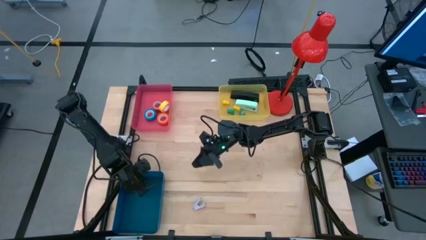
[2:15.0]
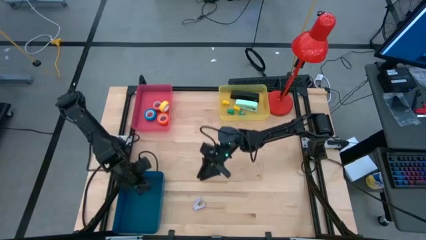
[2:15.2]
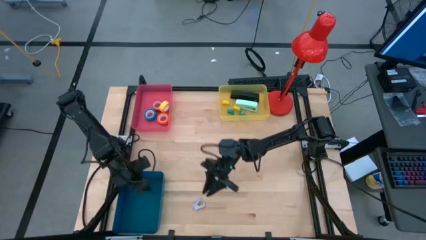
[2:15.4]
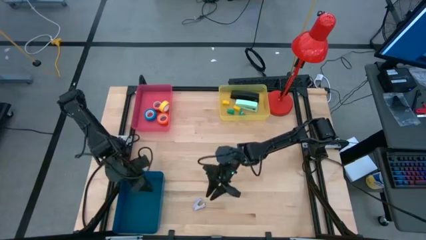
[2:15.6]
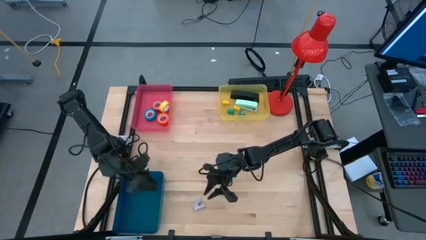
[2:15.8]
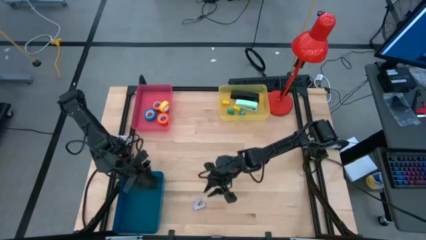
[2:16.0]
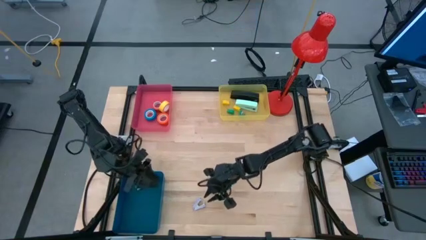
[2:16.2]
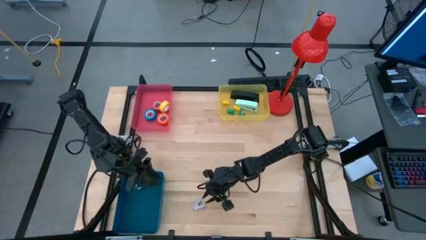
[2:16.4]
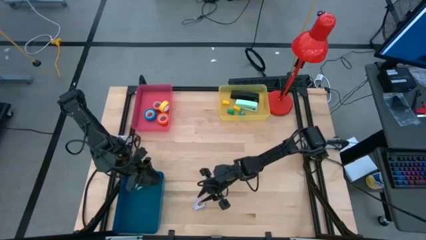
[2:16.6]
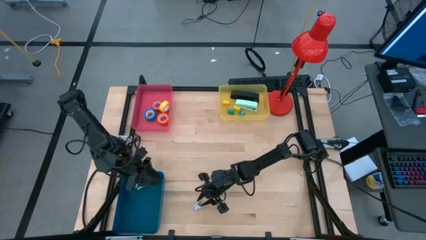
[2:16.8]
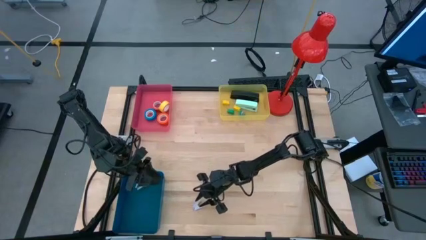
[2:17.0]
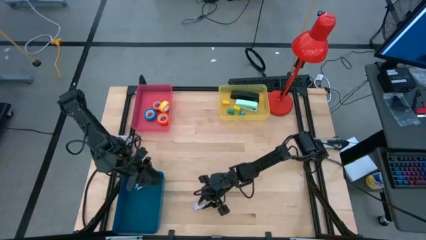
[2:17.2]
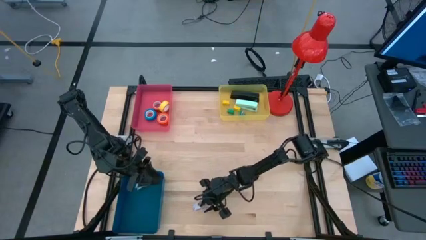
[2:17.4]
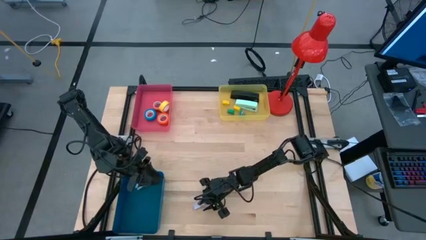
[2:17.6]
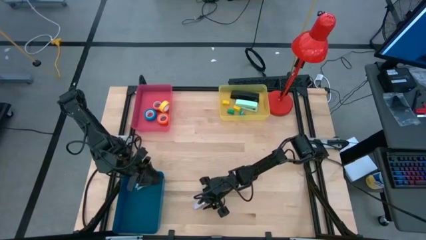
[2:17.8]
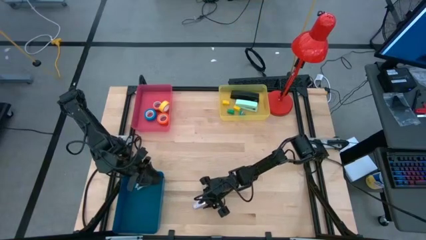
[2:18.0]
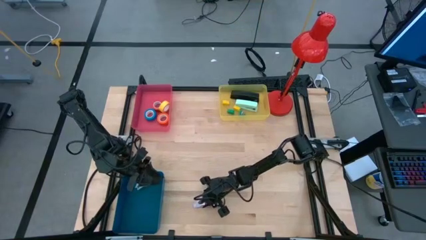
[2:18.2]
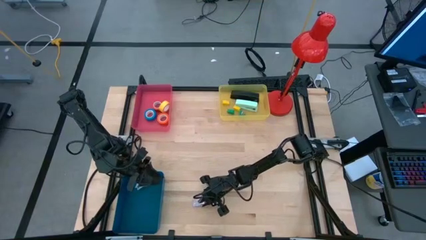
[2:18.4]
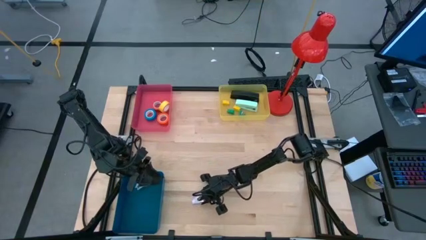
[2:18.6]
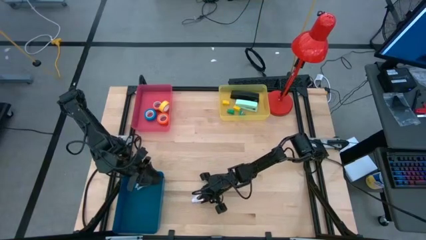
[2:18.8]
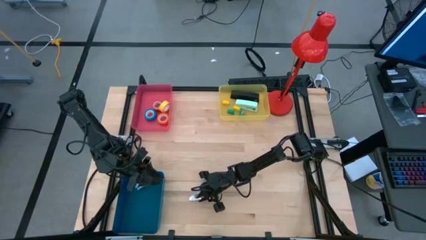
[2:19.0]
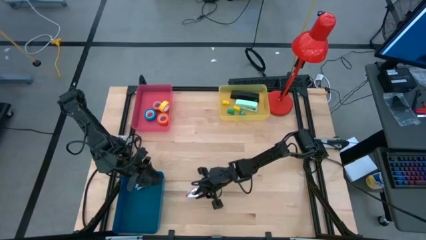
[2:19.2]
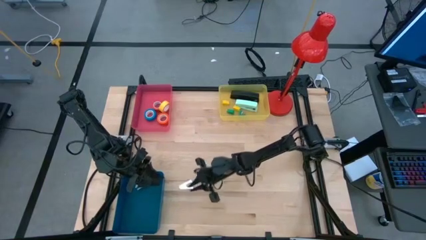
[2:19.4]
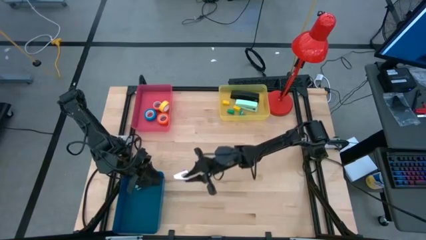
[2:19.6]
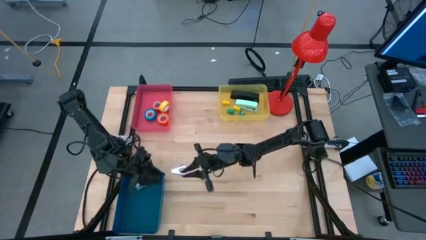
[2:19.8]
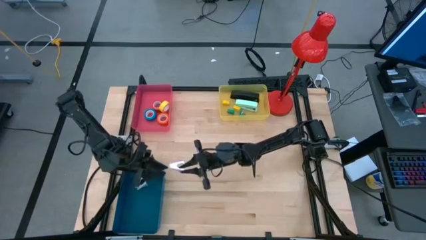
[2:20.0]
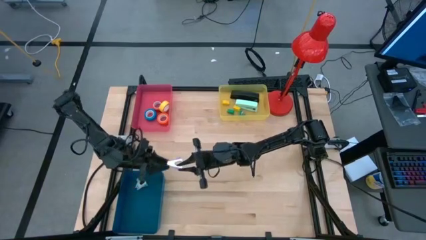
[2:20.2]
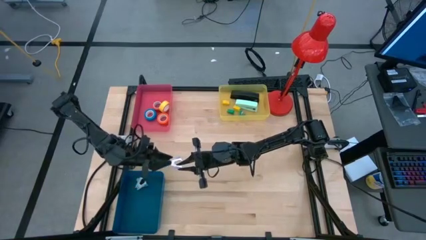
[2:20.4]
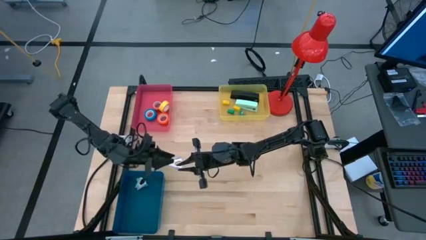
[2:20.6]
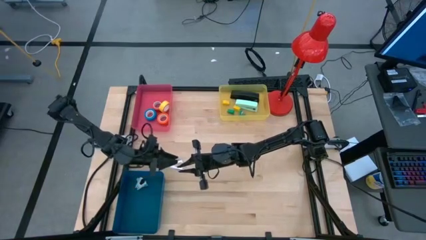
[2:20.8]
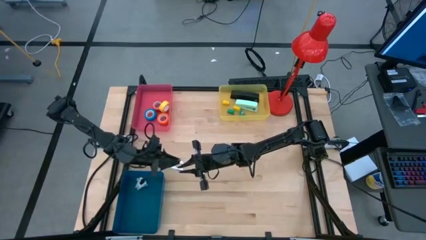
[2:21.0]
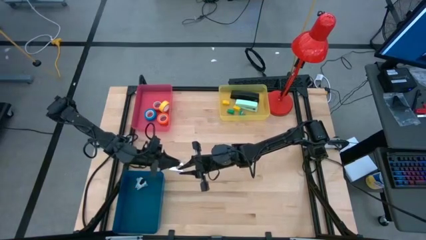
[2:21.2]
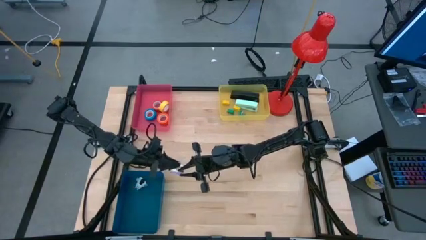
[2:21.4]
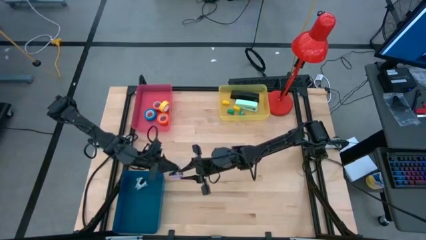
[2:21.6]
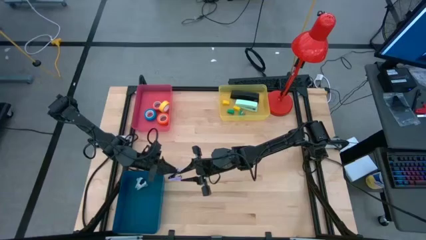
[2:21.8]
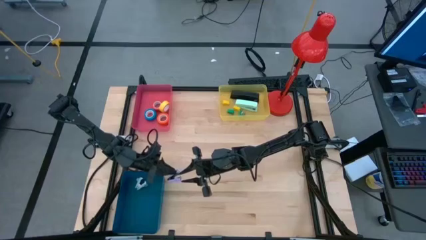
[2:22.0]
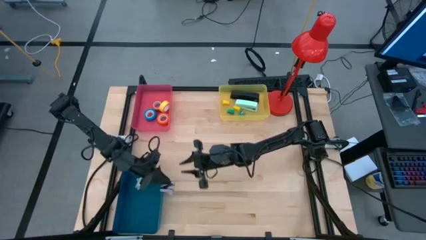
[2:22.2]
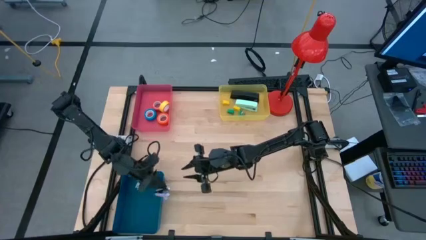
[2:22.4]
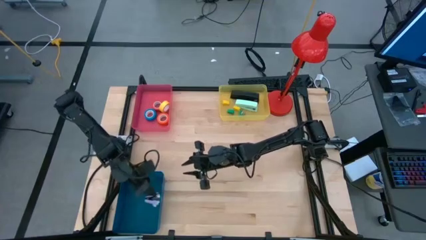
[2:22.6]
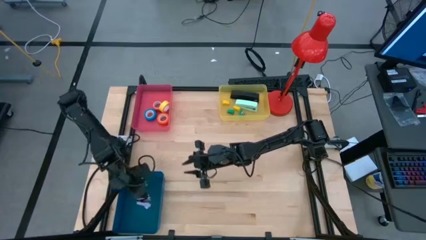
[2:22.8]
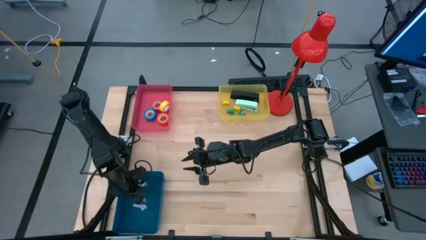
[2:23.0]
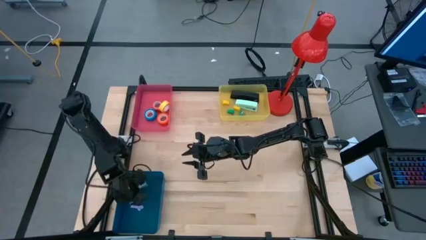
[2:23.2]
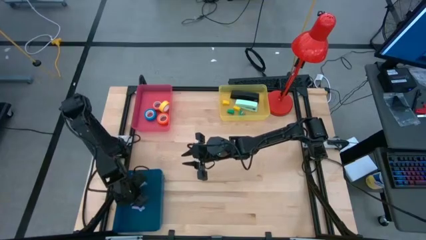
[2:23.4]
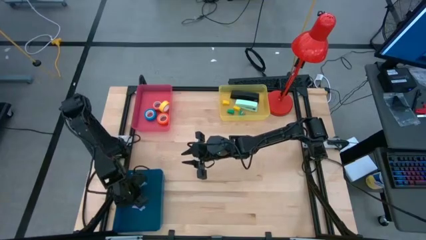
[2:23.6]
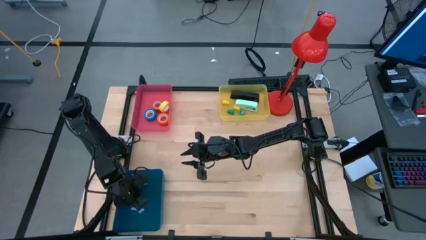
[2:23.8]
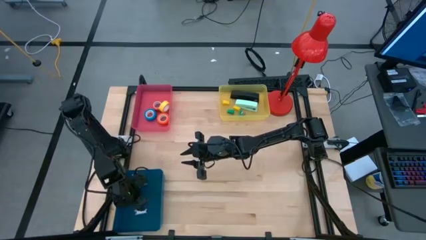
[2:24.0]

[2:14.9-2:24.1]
Task: Pick and place Stapler, Stapler remover, tape
Put the purple staple remover into the blue bin

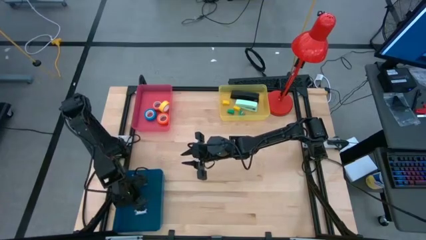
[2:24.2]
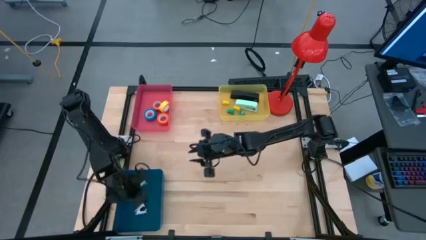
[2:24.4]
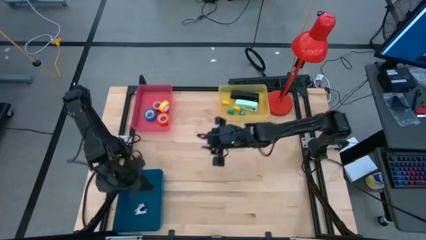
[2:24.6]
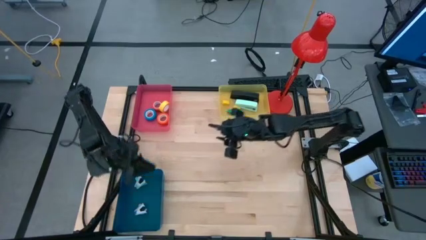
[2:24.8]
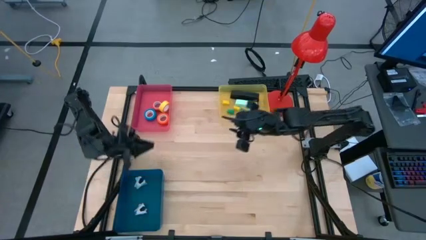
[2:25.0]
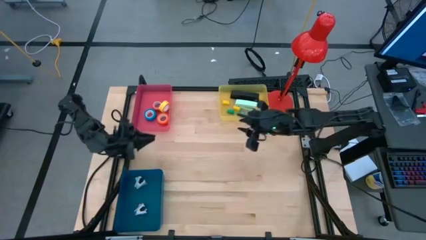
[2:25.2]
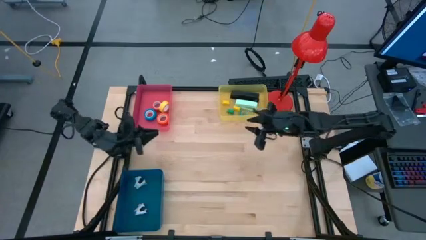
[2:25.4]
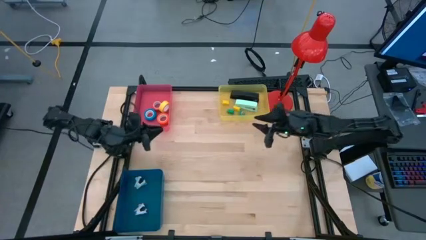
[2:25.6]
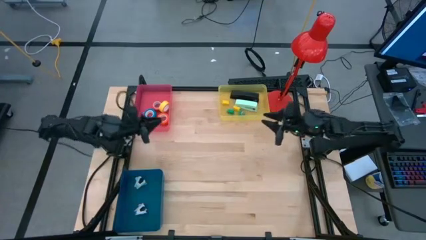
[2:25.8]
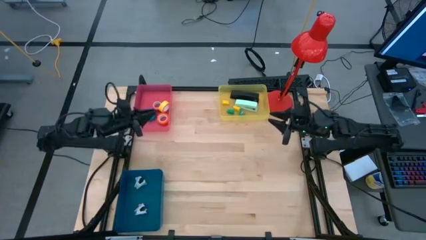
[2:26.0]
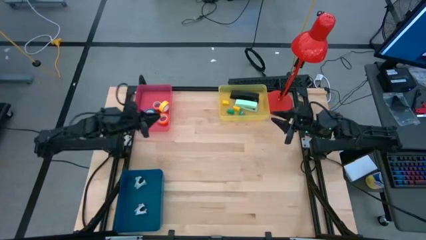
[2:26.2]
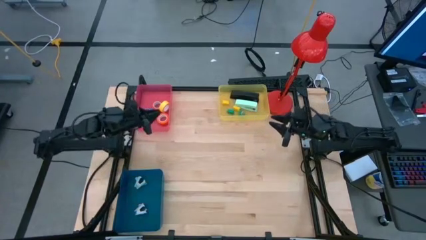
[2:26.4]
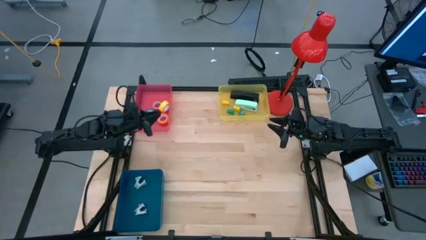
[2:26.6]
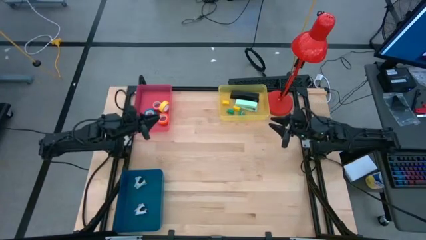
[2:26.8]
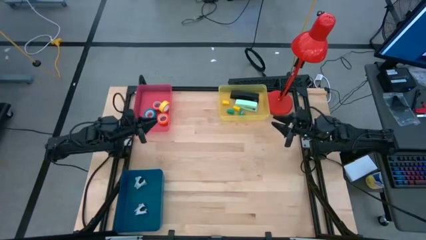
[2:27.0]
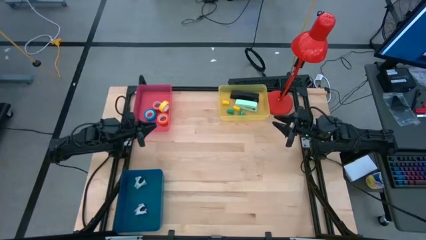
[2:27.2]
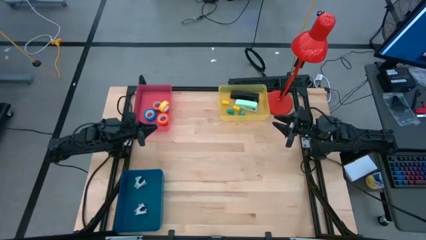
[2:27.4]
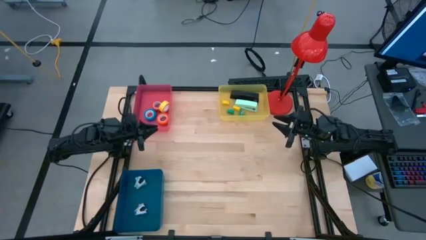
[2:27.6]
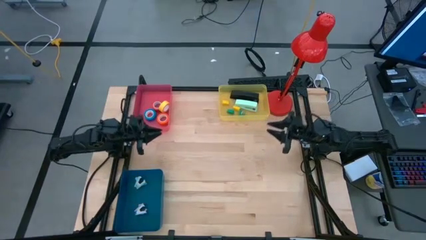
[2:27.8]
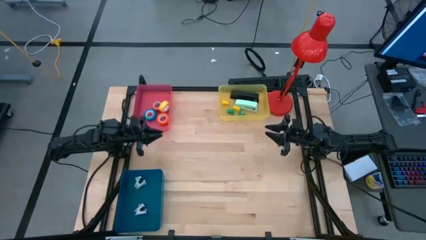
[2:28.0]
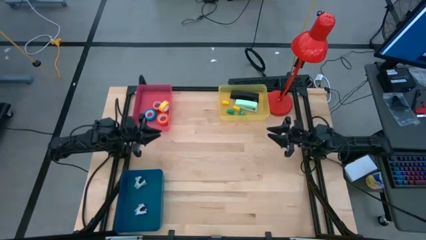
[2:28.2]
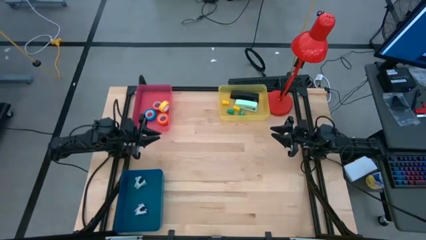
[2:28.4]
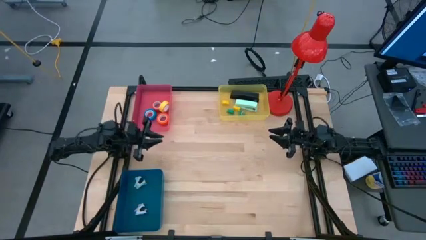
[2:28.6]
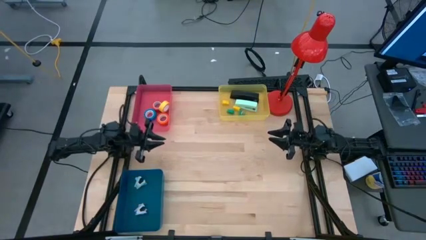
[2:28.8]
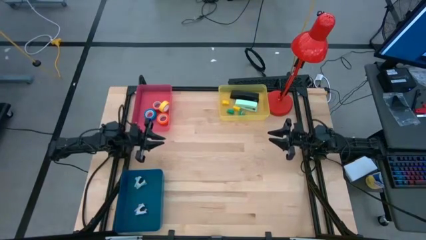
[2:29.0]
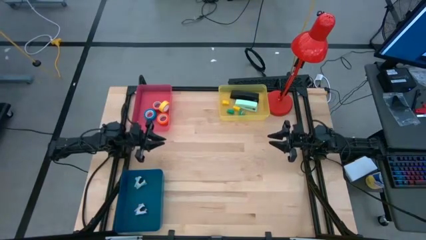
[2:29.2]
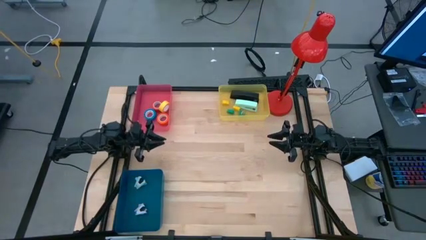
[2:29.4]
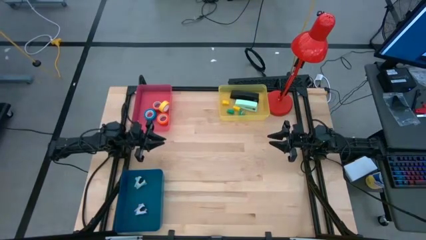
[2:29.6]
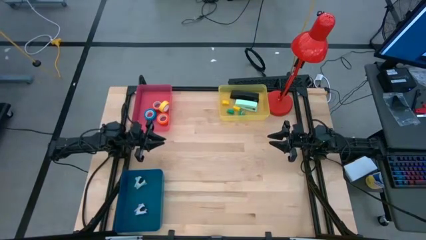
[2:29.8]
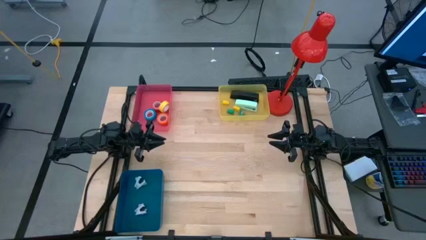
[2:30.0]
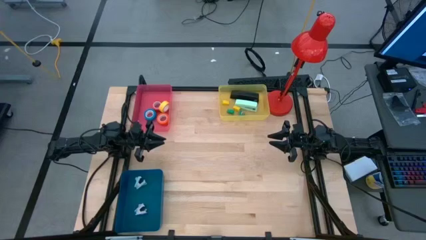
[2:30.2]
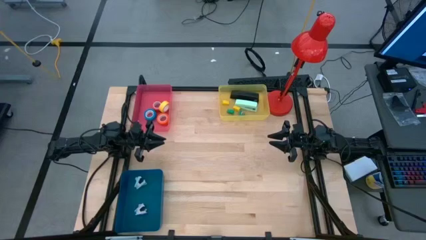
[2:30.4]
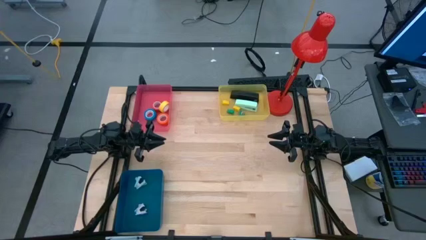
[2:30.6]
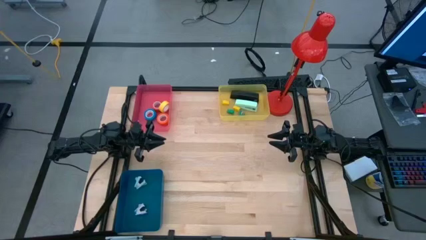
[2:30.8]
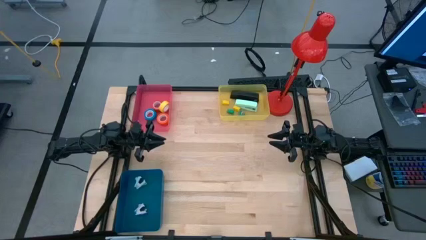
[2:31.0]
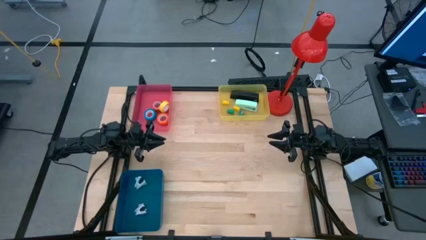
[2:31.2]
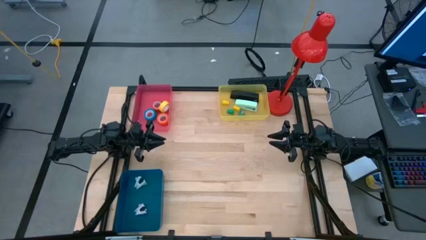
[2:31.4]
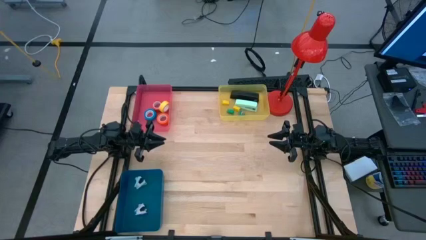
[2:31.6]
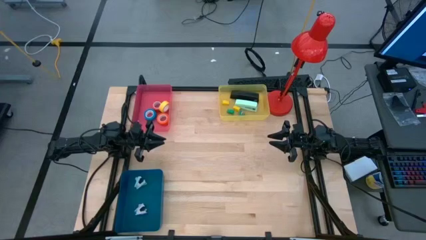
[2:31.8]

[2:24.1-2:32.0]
Return to Home Position
